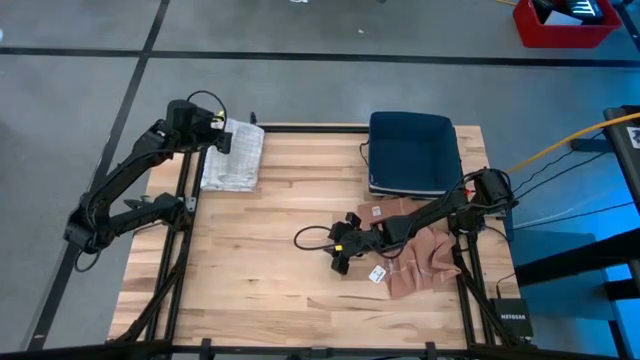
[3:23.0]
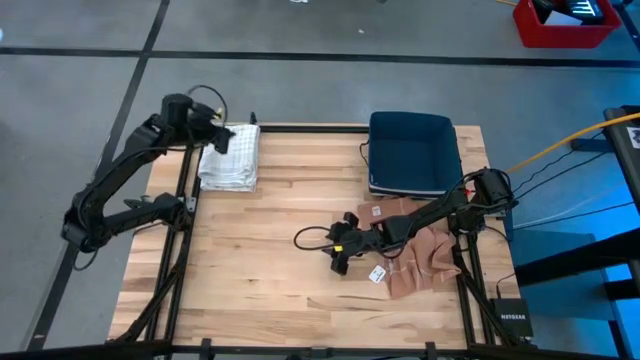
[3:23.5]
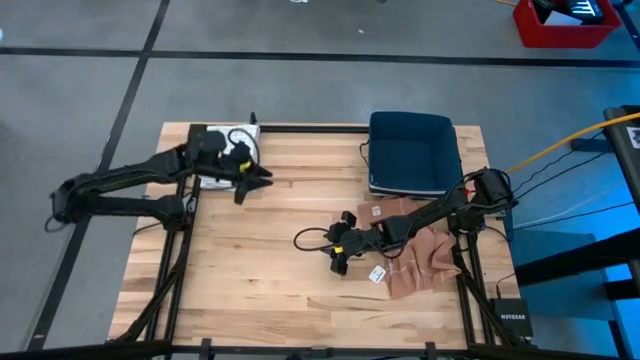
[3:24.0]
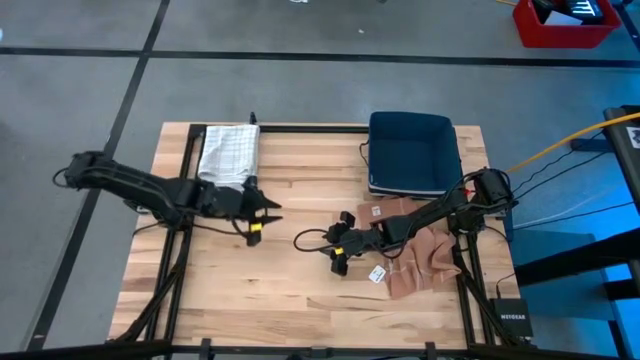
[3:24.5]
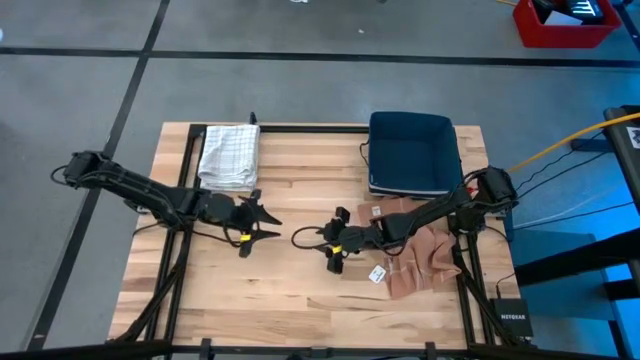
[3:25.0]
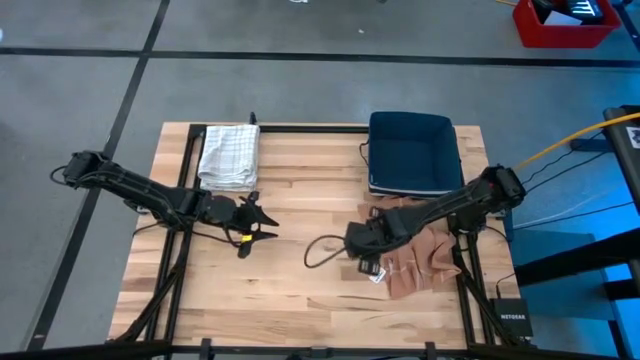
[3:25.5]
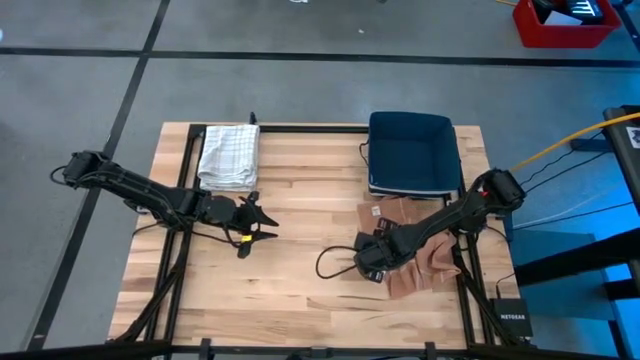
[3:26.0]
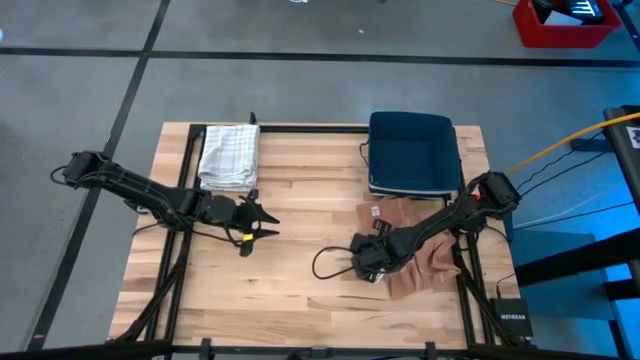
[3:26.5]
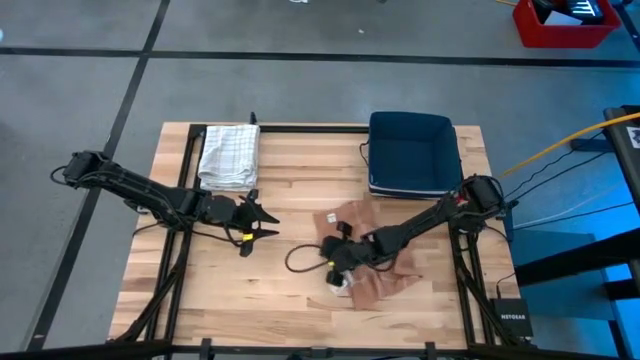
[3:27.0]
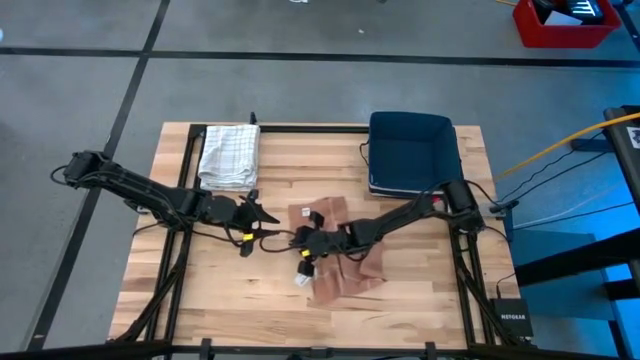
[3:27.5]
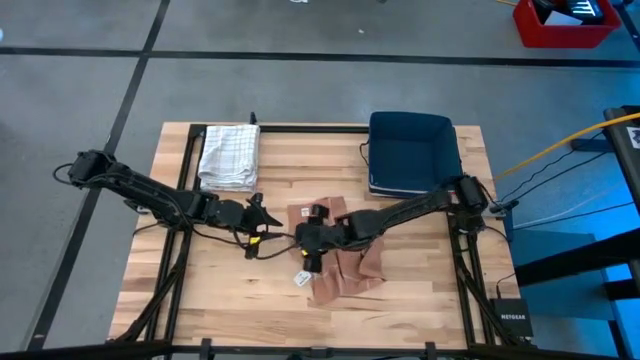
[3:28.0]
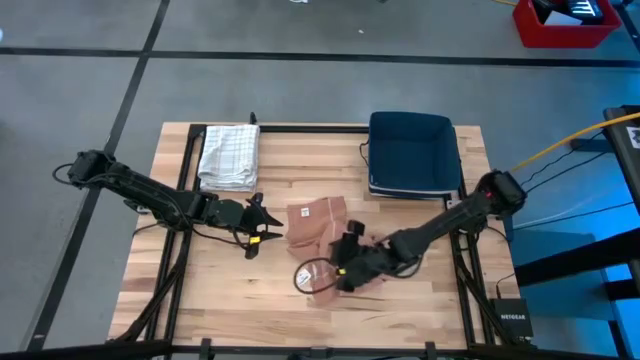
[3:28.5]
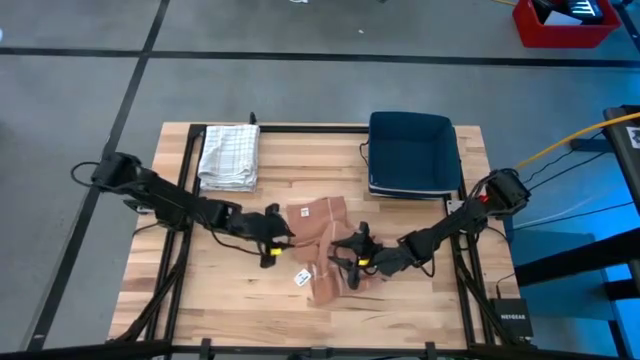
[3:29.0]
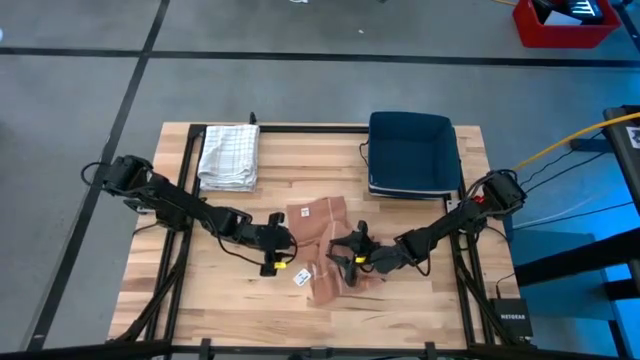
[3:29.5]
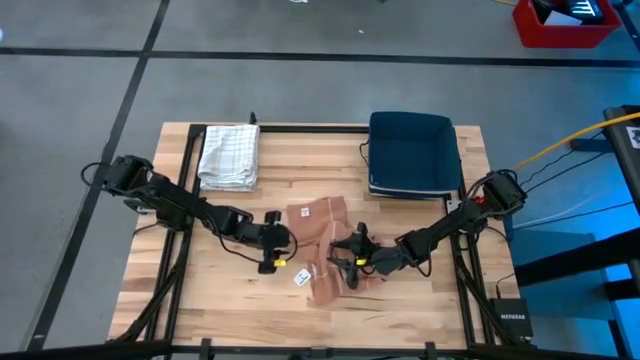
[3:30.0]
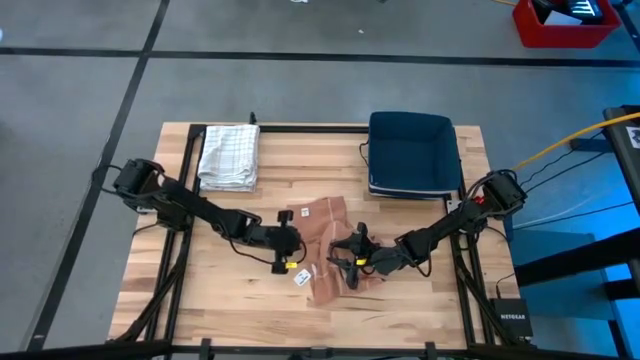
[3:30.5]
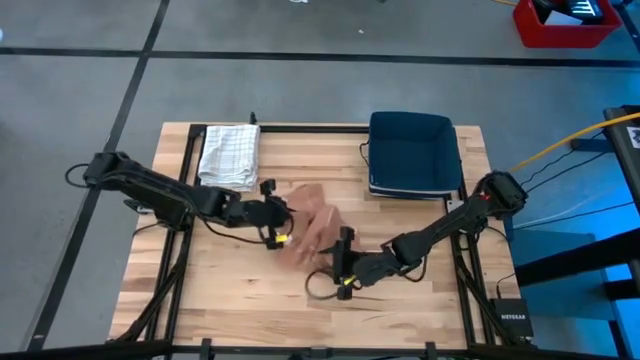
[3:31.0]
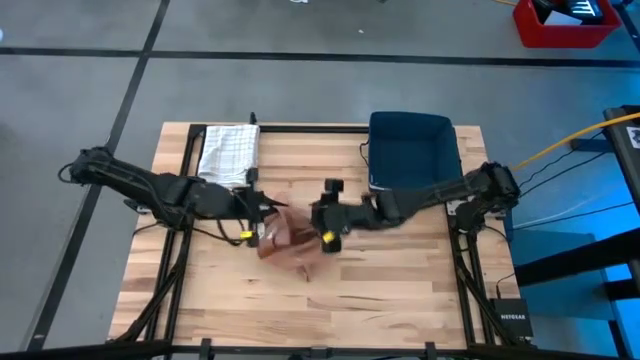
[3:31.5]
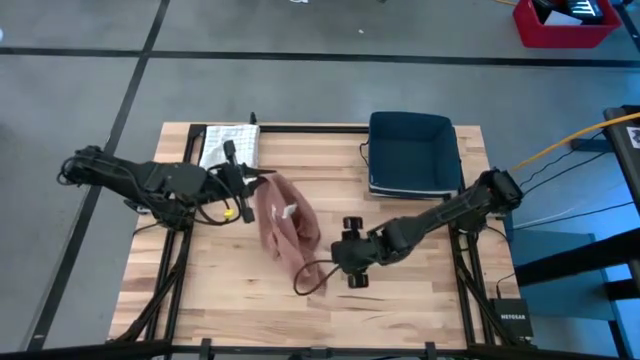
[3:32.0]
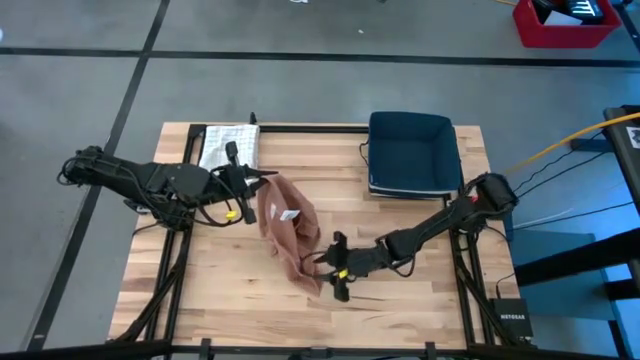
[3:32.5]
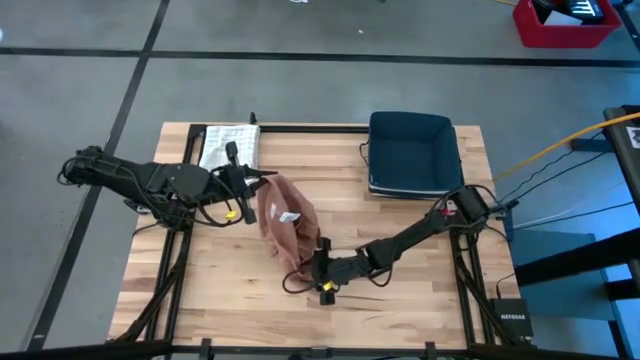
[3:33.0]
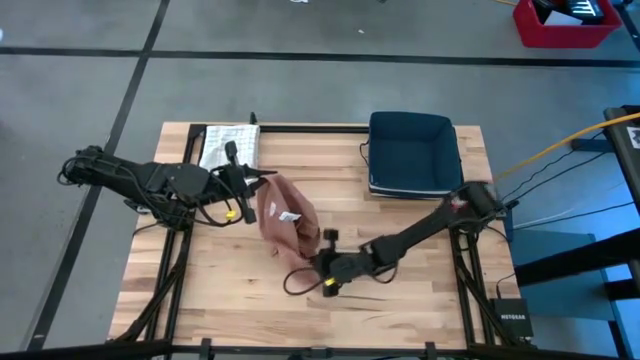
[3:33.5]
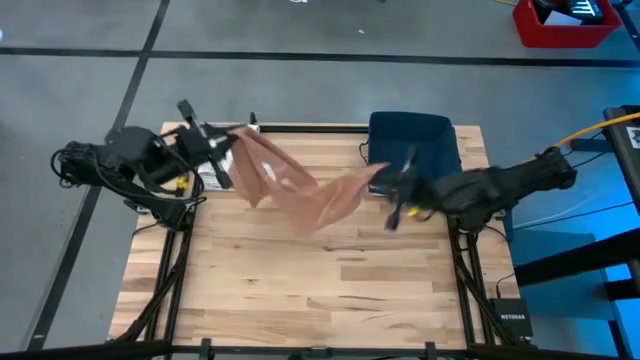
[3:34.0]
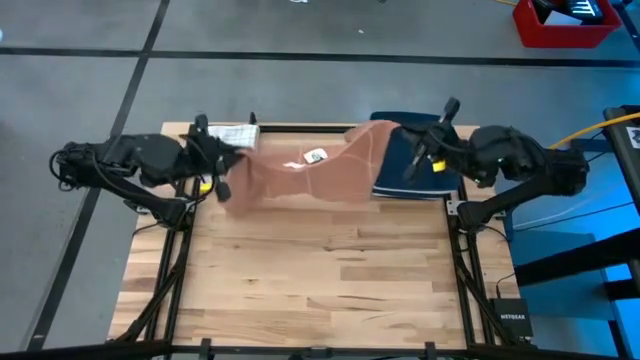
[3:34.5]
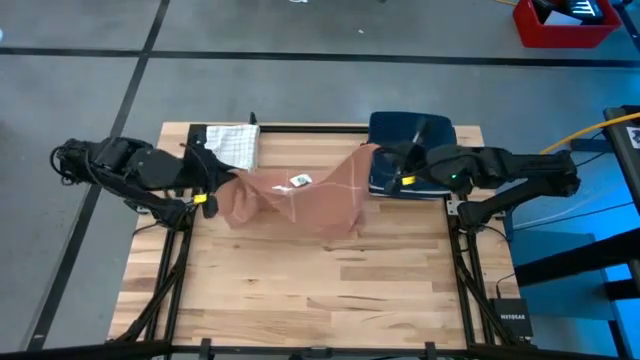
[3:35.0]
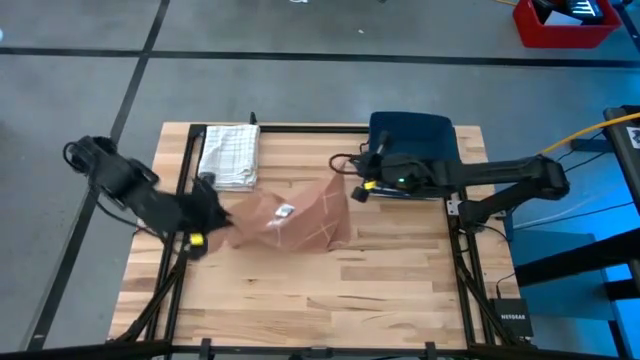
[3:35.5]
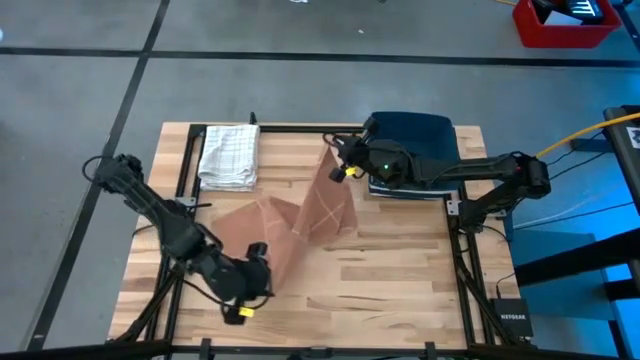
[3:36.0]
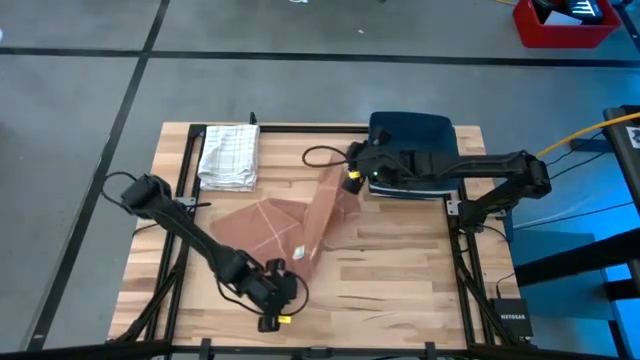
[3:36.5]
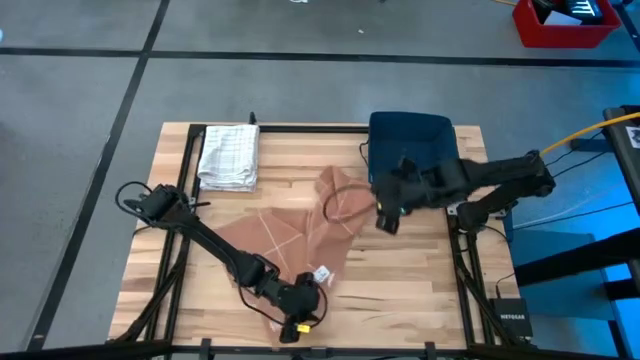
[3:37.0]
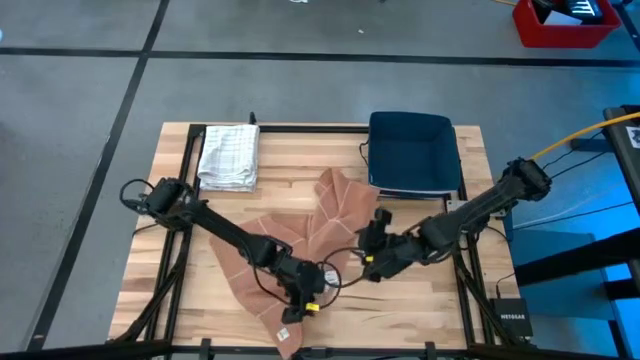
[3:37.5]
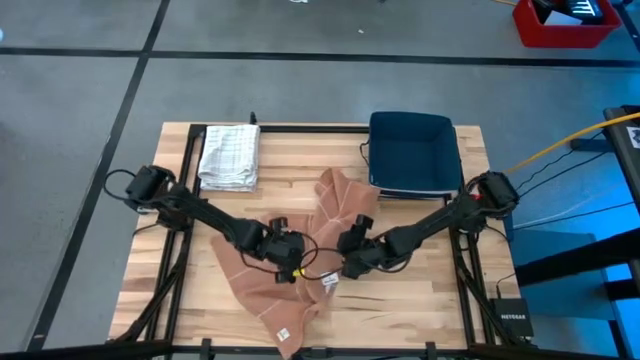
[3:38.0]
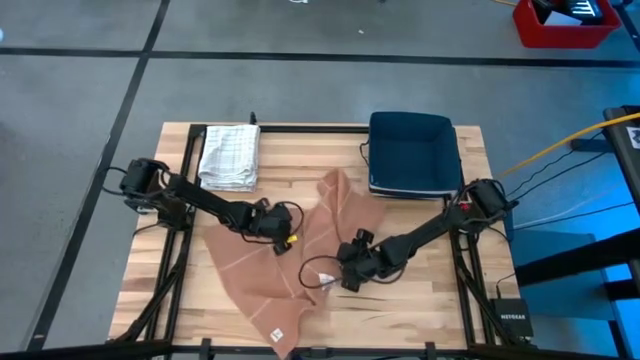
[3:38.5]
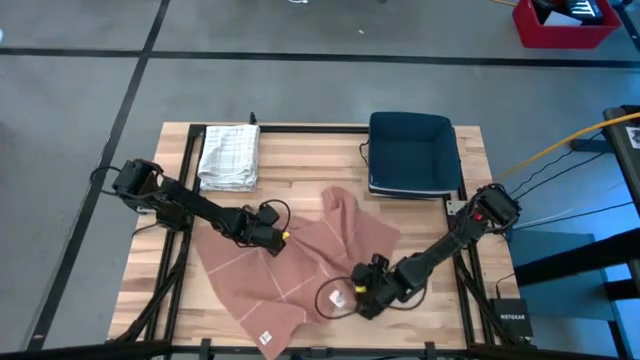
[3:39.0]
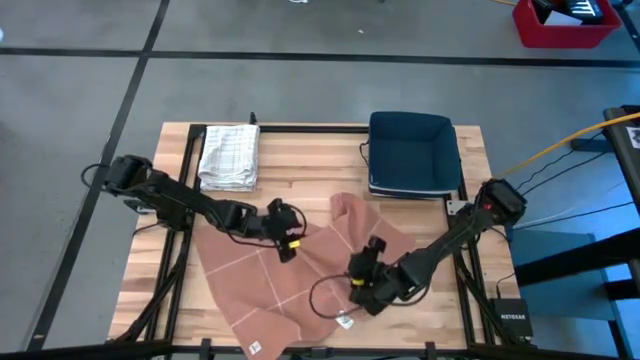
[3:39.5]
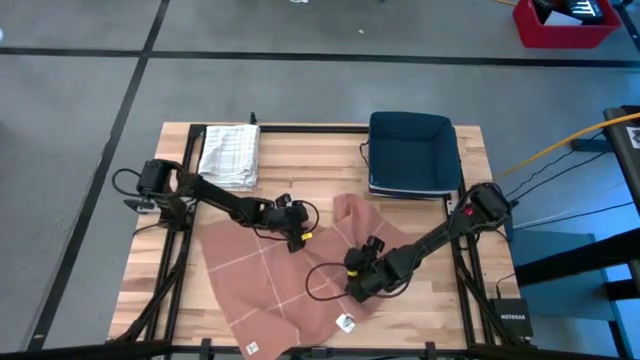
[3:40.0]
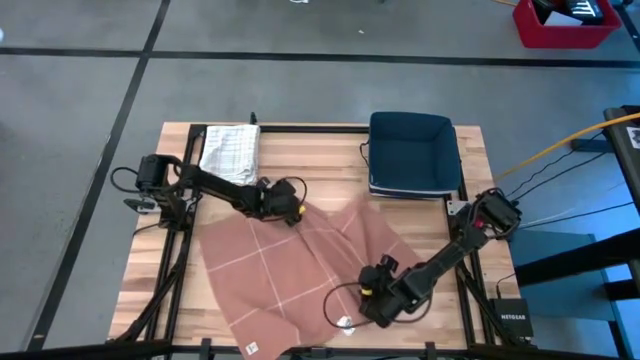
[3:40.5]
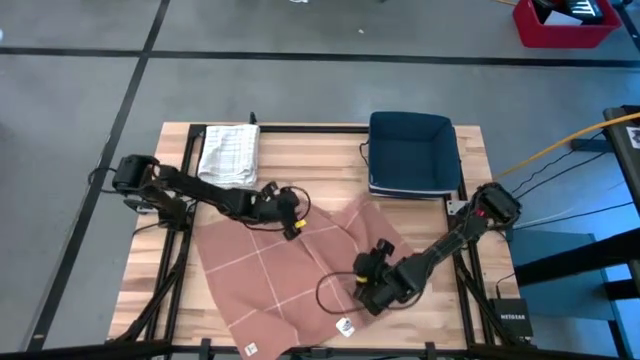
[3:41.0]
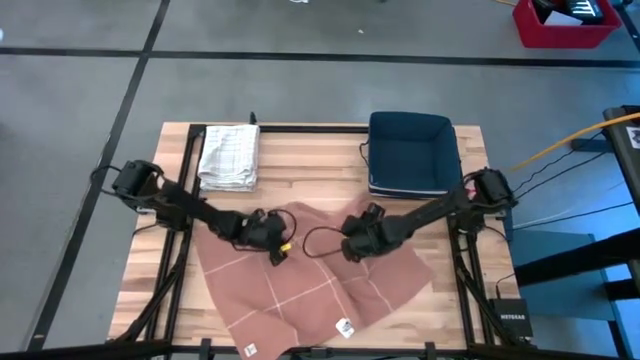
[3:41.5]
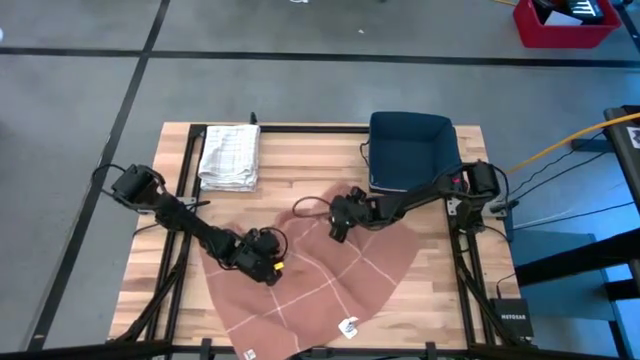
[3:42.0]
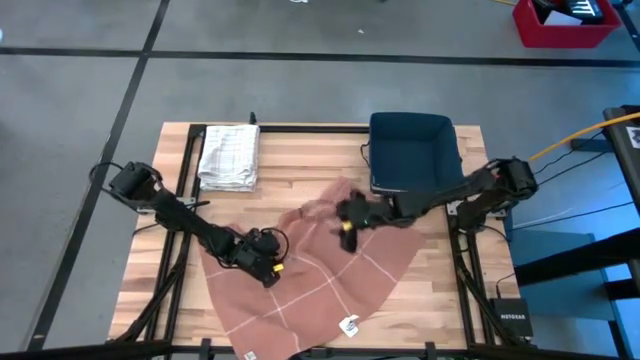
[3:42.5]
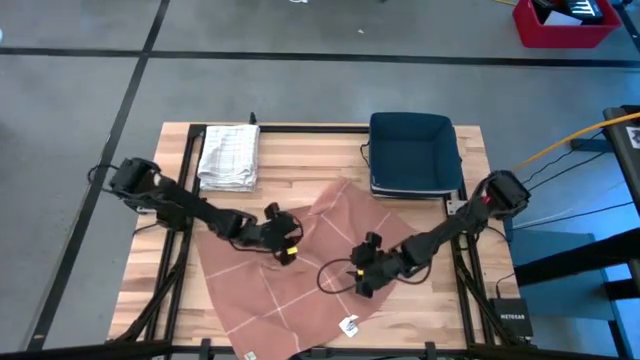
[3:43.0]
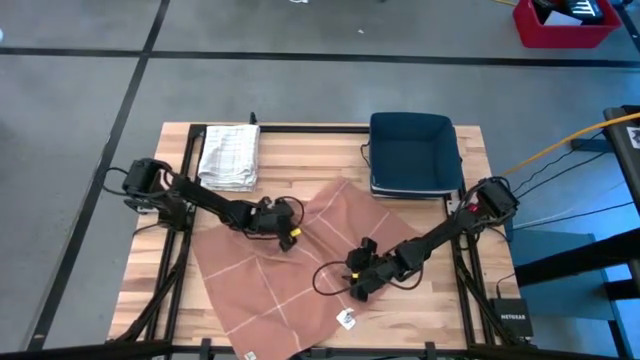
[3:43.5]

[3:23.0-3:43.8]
Task: Fold towel
Fold the brown towel on the table
